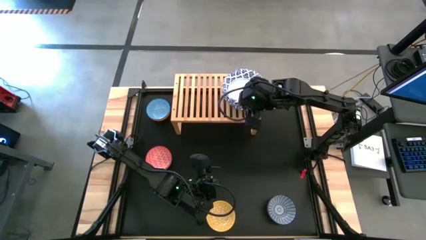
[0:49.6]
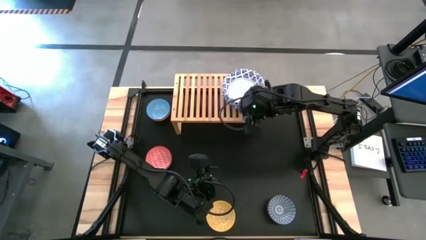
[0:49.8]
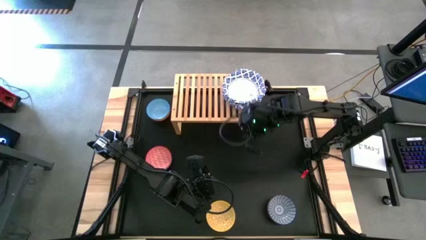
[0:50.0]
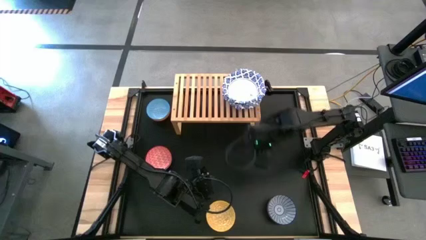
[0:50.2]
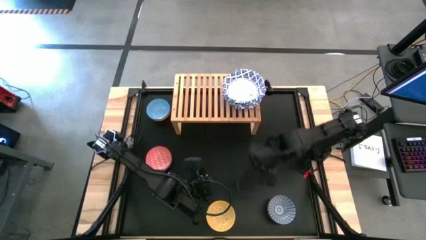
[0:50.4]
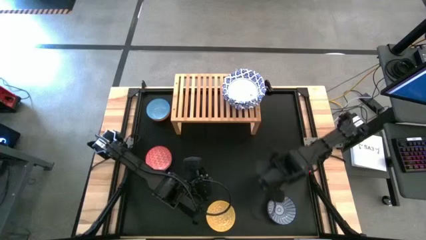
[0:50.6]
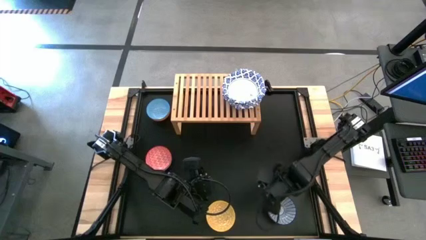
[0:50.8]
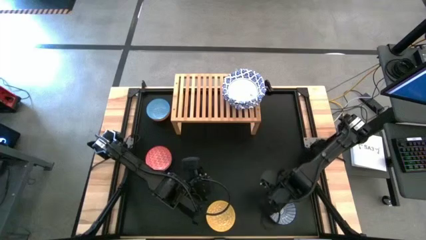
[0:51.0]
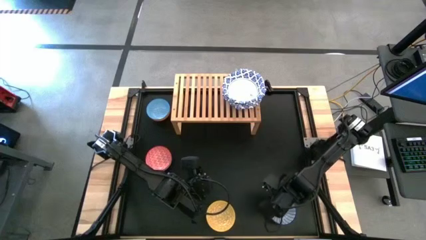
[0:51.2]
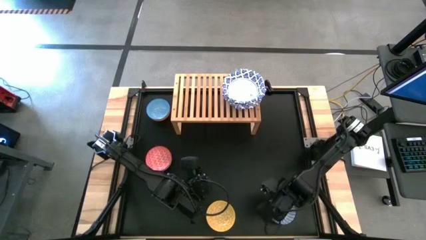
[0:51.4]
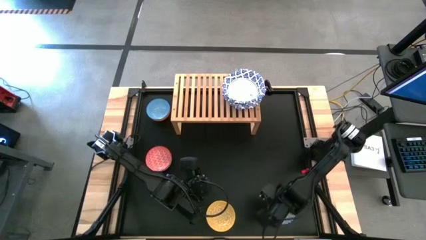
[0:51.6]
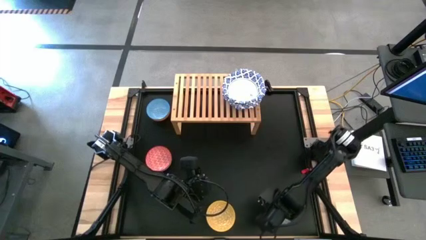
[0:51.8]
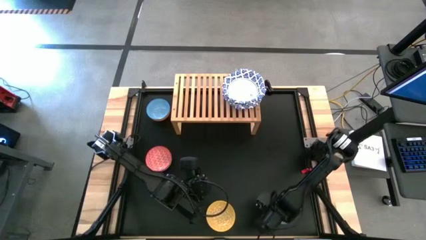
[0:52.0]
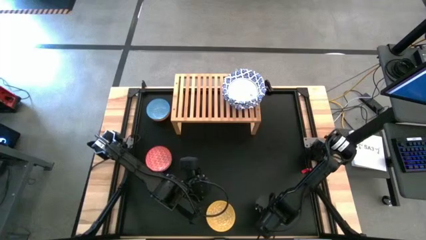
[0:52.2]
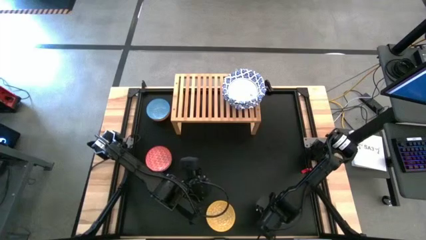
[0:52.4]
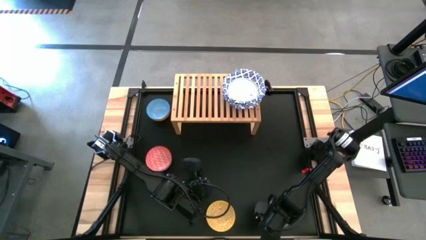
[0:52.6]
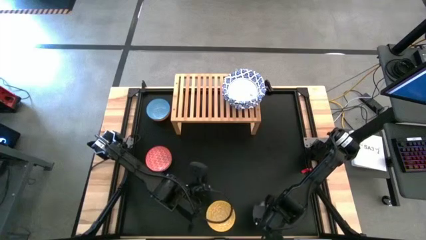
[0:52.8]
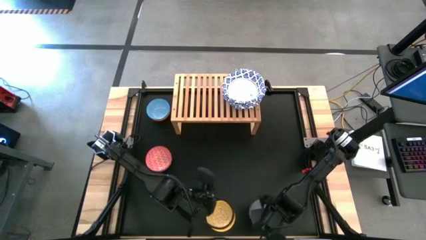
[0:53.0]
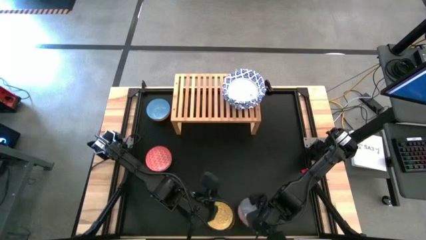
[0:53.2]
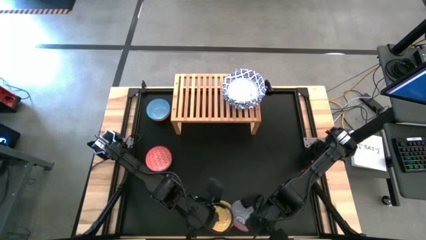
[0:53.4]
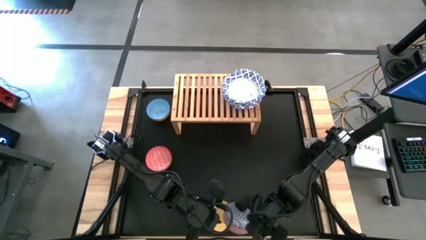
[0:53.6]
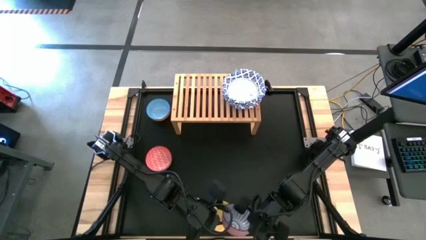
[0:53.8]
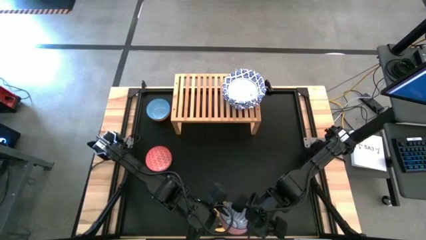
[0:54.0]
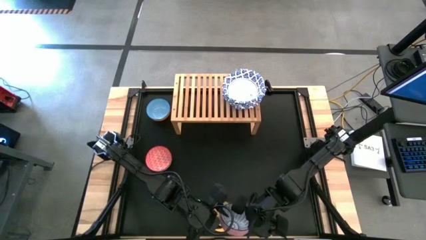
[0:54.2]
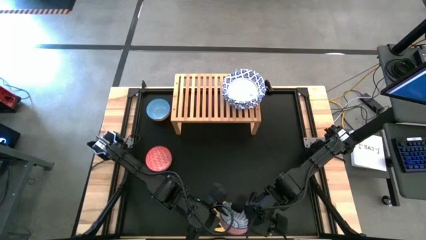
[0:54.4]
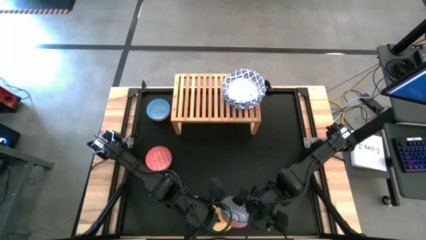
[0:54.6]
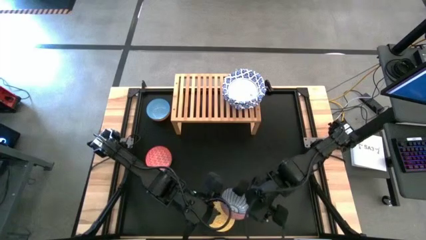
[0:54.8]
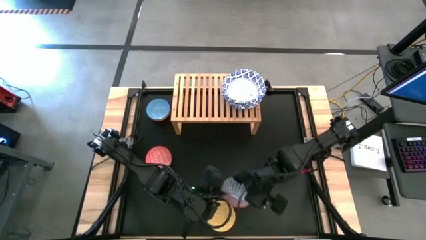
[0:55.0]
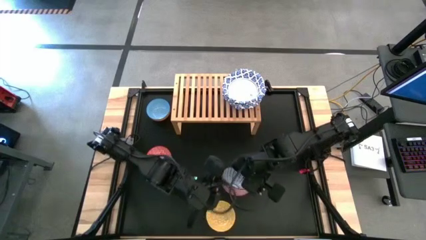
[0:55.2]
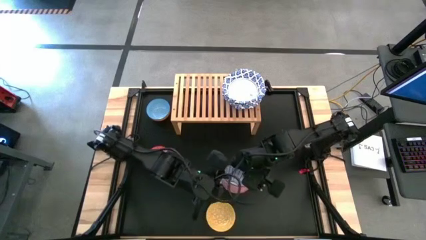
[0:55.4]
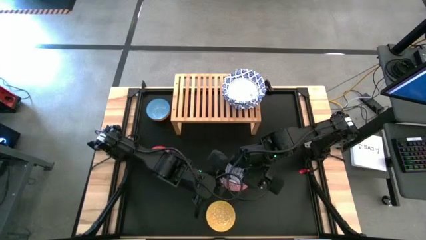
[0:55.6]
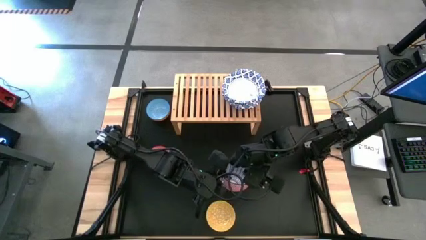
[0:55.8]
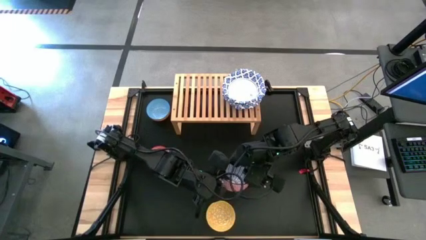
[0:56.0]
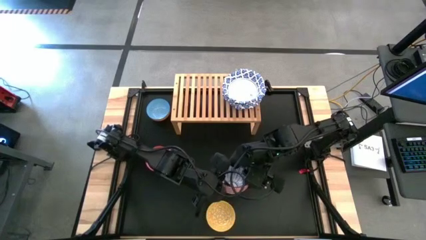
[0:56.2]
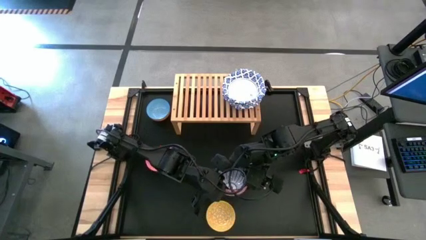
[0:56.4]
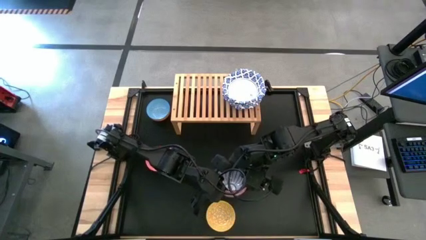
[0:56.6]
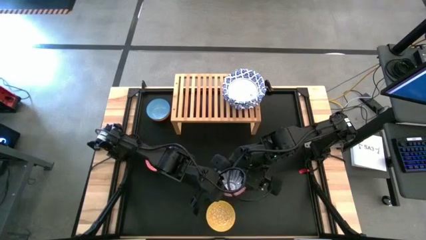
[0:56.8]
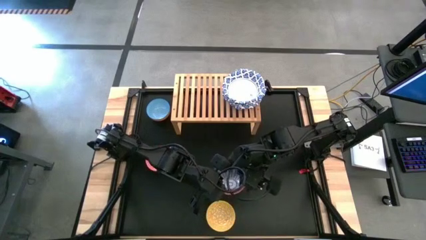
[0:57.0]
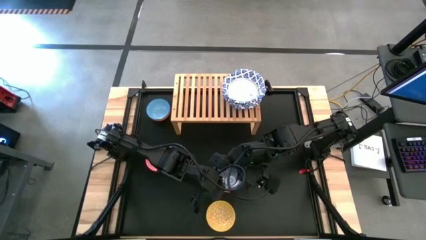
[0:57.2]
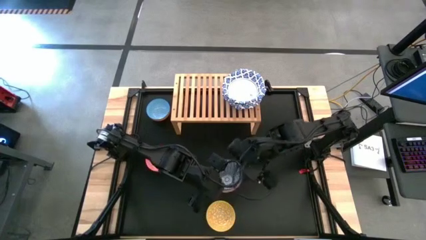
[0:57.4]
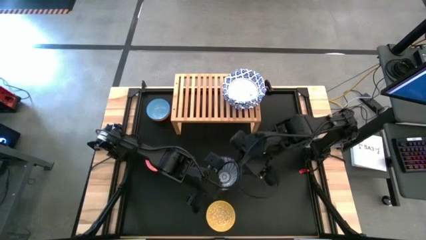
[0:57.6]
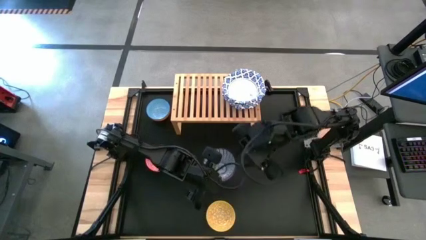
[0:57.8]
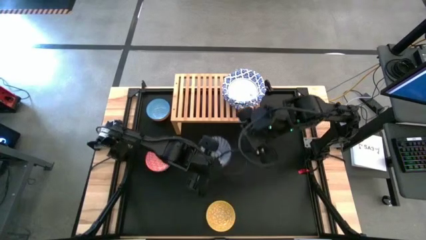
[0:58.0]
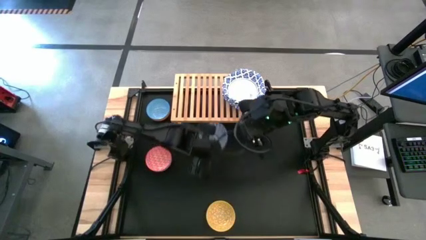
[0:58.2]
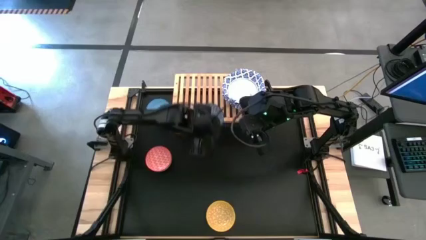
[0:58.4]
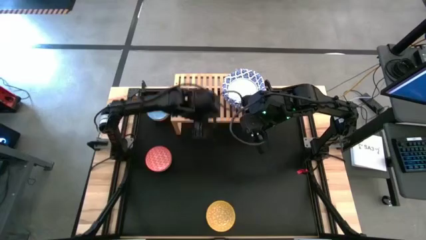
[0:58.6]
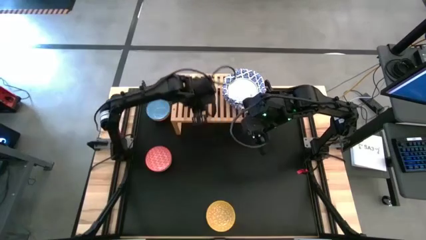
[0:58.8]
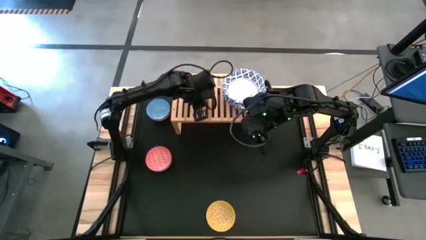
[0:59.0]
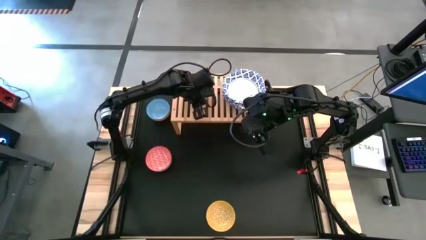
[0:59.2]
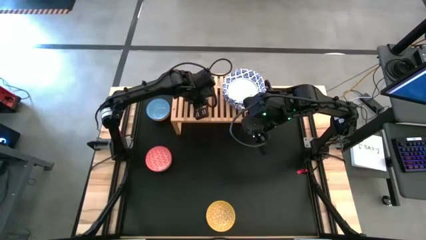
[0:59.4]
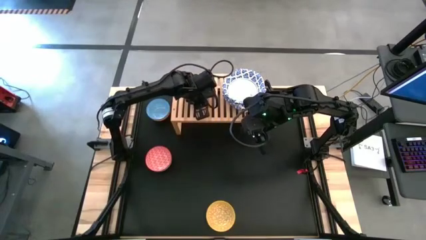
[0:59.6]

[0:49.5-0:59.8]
Task: Place and stack bowls onto a shelf
Put the red patterned bowl on the shelf

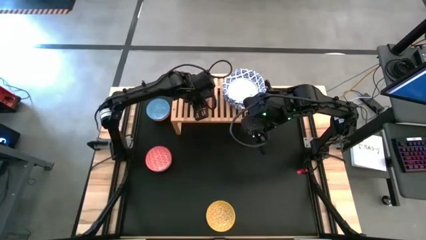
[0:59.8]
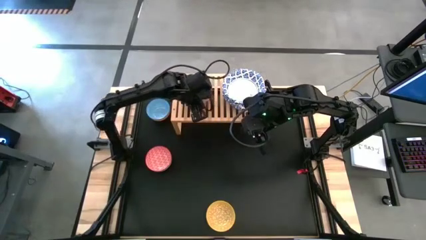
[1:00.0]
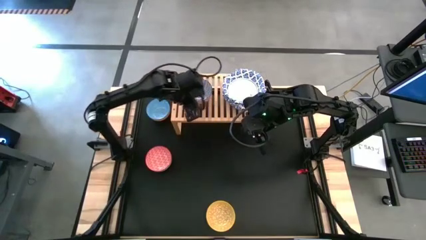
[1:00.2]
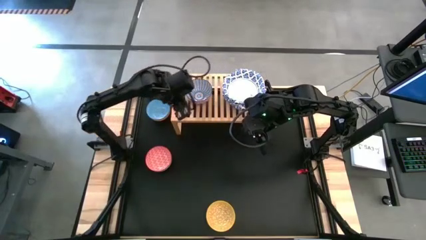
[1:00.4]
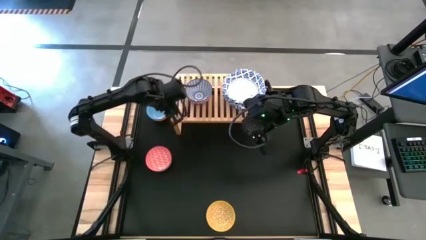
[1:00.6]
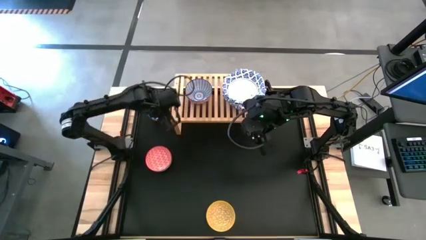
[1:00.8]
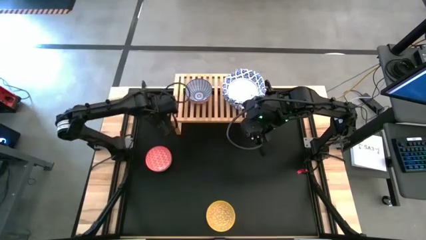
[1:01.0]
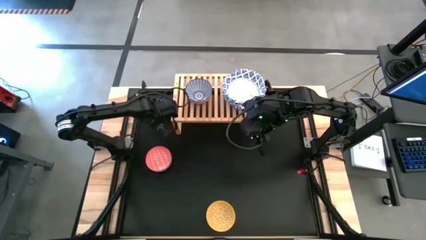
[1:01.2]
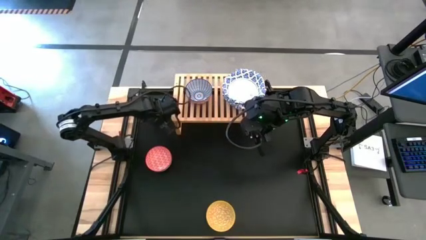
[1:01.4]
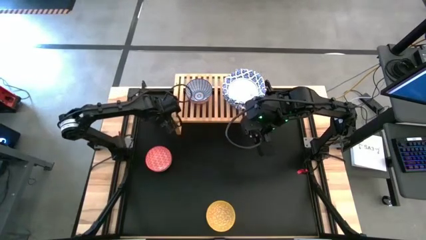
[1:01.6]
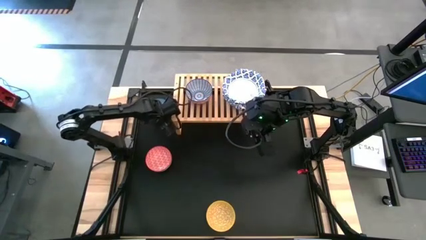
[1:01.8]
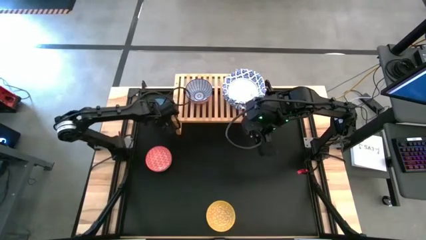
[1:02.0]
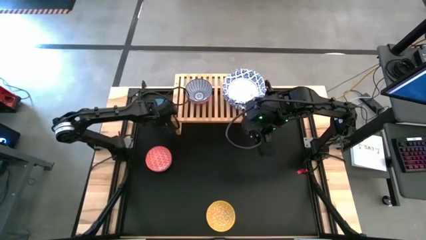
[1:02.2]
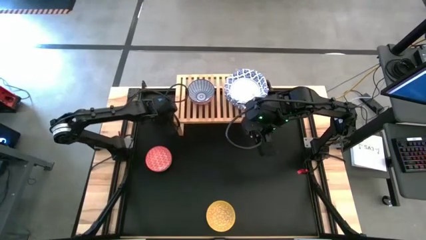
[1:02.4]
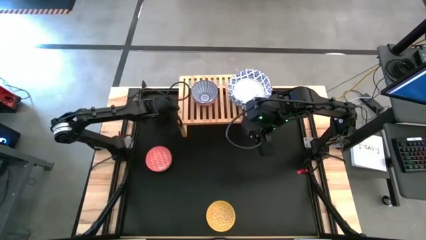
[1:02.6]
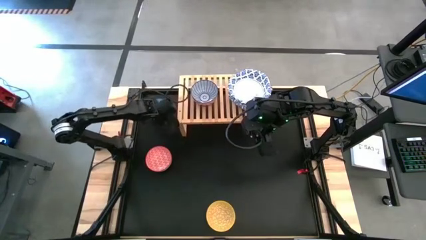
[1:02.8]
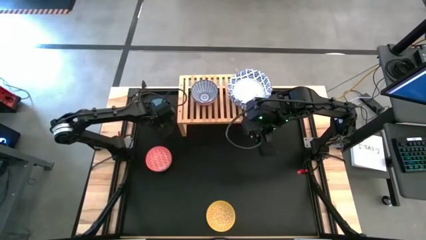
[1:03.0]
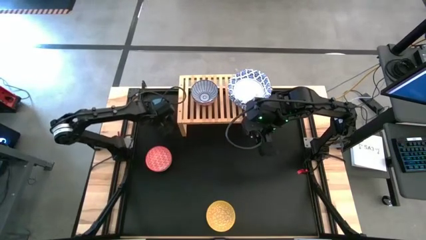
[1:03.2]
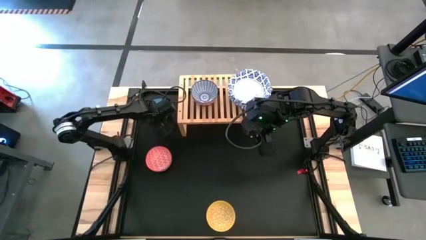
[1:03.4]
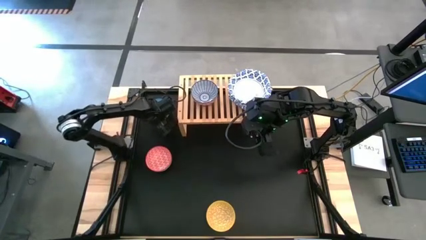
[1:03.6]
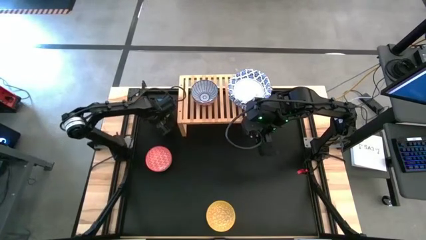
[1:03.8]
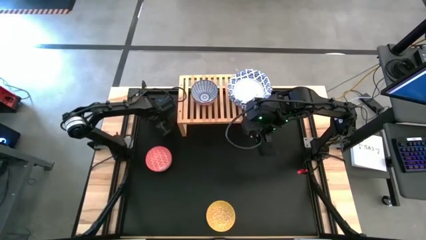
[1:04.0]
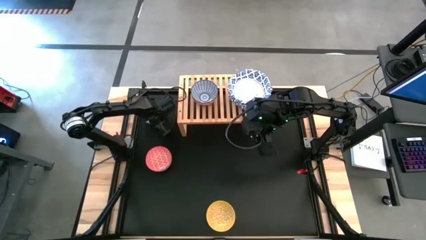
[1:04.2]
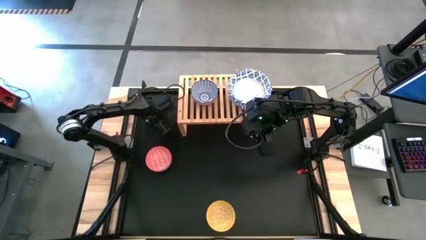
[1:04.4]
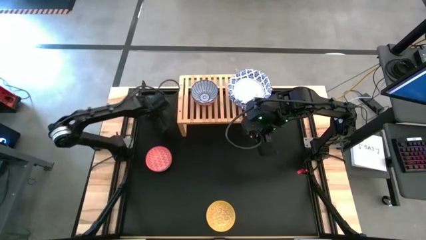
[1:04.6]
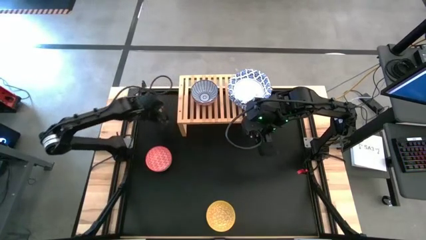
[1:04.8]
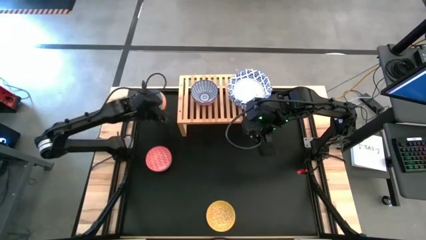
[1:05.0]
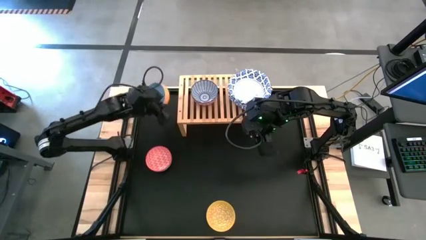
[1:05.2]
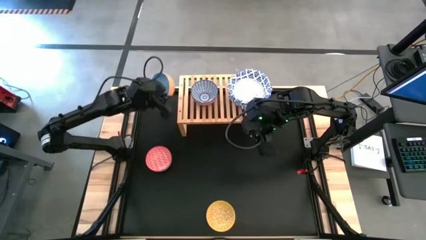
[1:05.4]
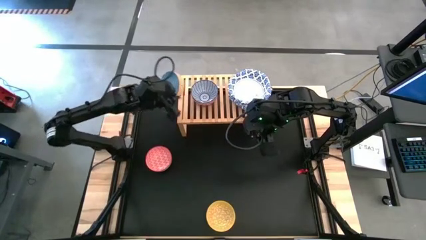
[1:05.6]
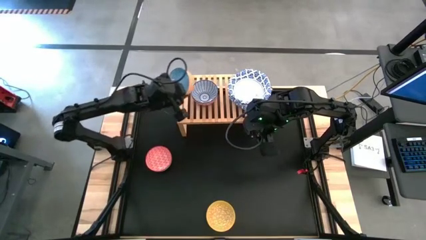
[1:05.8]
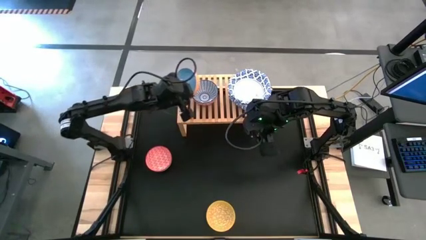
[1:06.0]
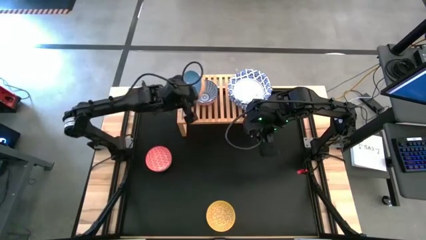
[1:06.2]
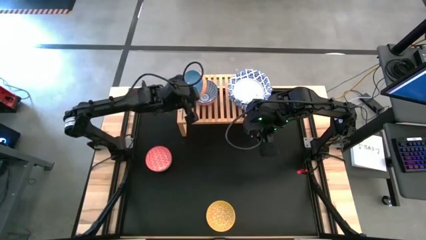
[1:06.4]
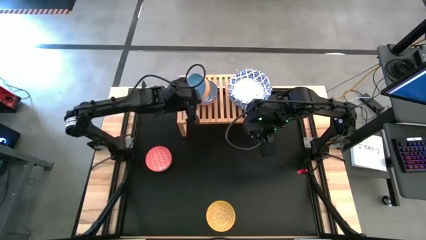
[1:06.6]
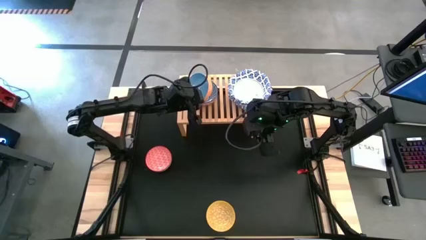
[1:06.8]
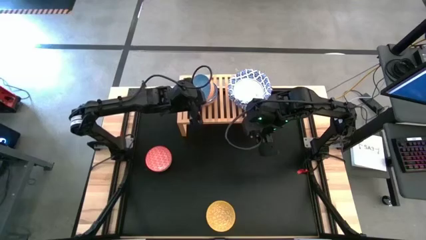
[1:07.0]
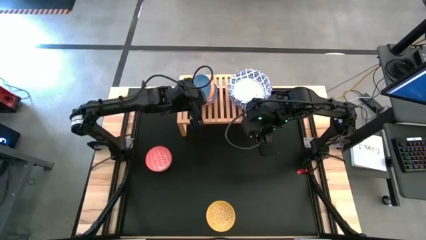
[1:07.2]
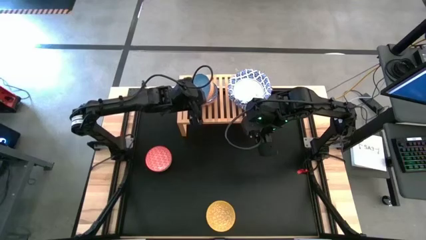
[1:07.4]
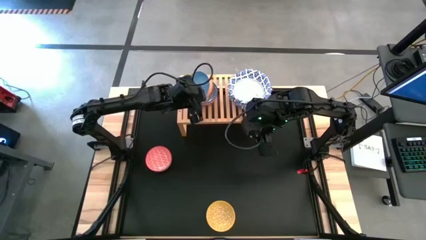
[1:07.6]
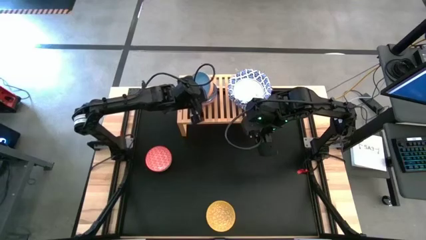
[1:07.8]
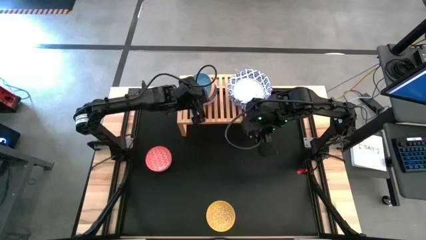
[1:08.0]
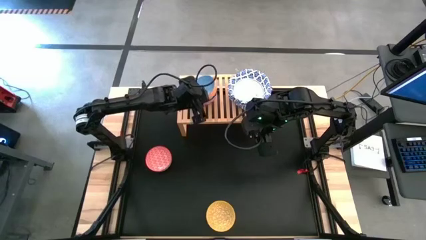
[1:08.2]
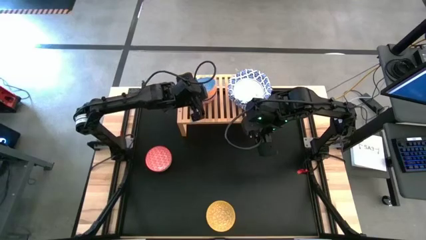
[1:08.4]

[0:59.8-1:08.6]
Stack the orange patterned bowl on the red patterned bowl on the shelf
